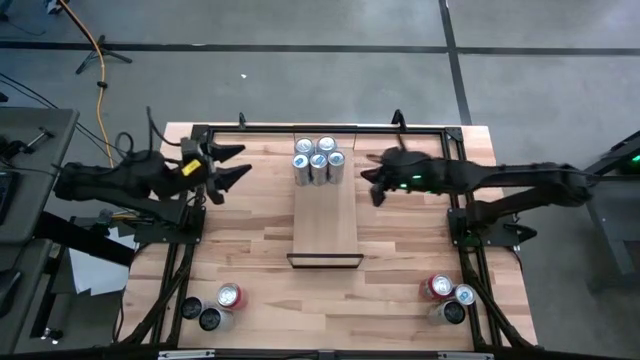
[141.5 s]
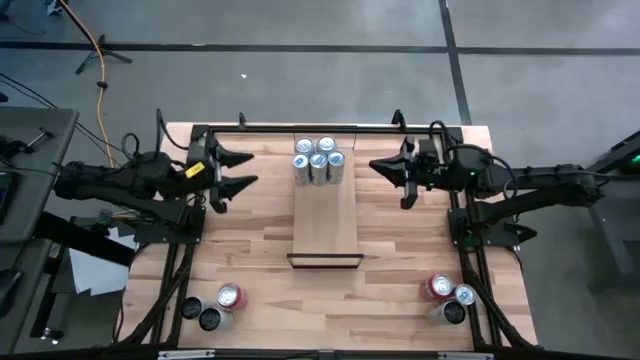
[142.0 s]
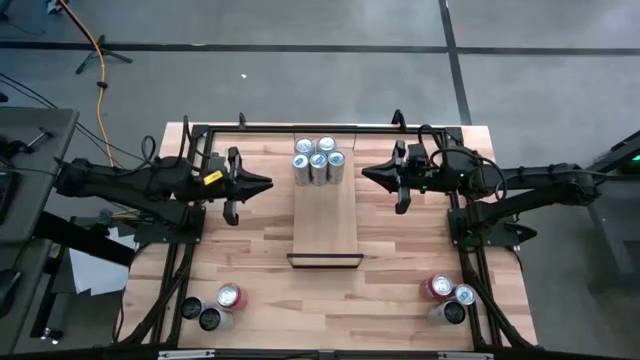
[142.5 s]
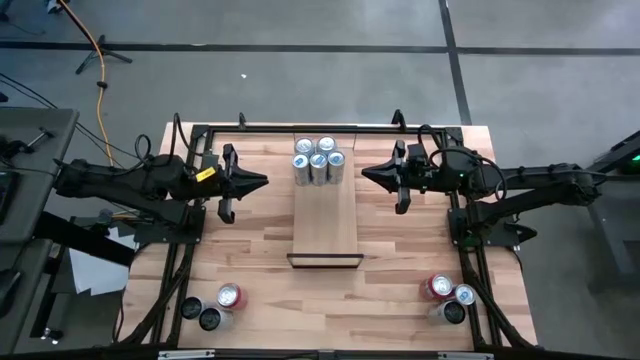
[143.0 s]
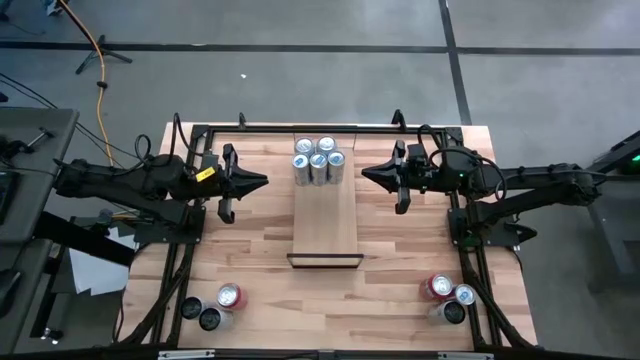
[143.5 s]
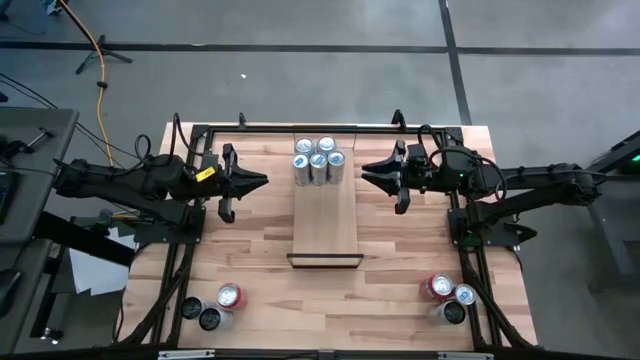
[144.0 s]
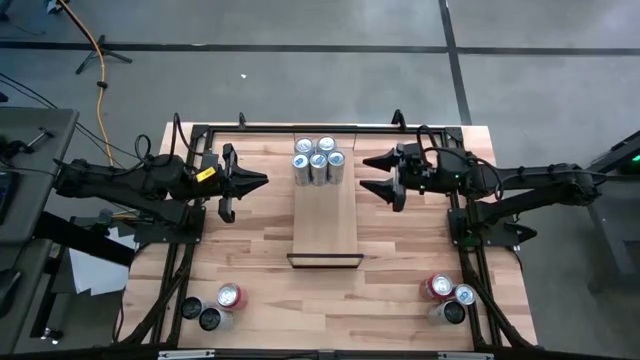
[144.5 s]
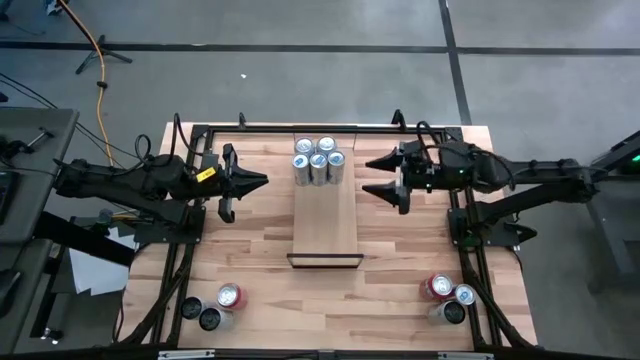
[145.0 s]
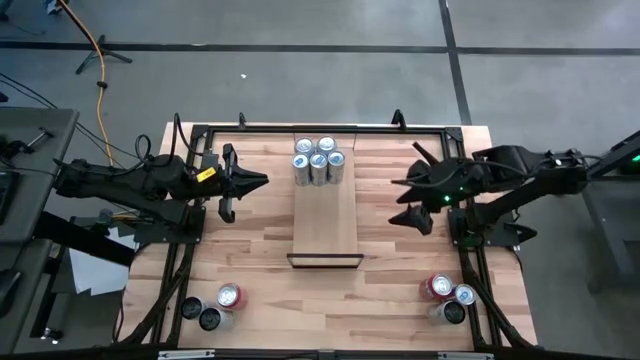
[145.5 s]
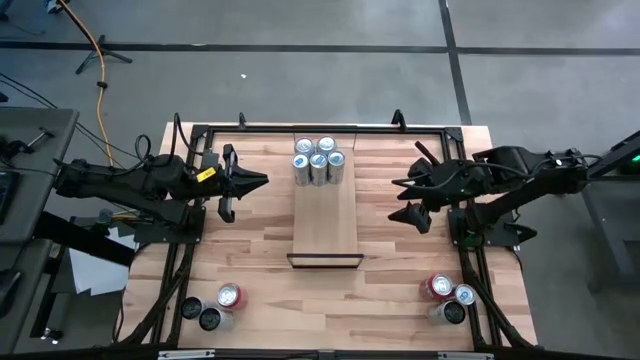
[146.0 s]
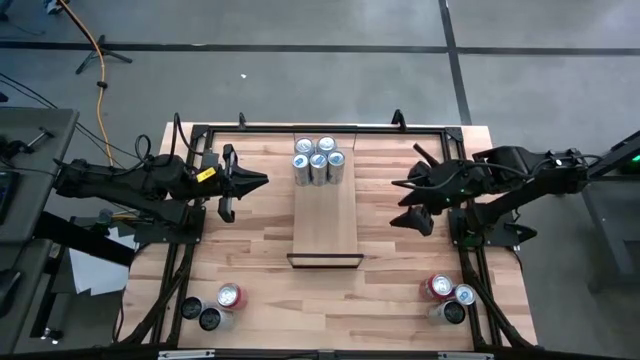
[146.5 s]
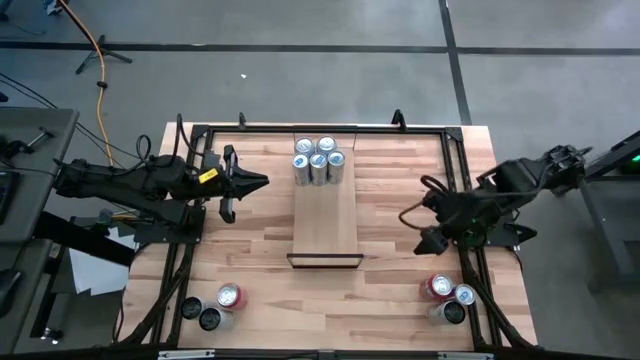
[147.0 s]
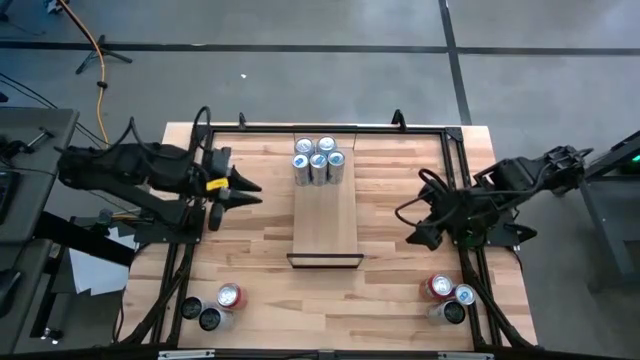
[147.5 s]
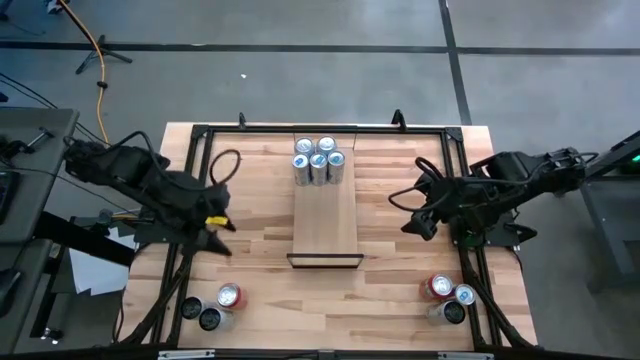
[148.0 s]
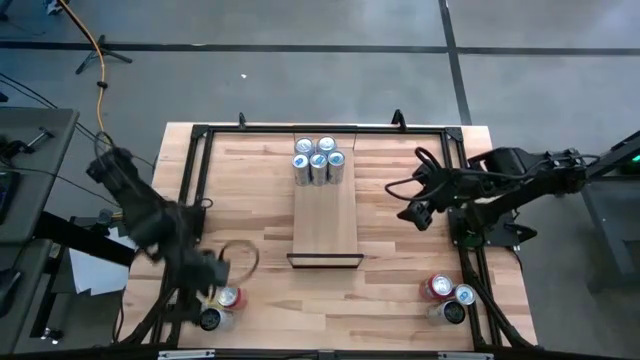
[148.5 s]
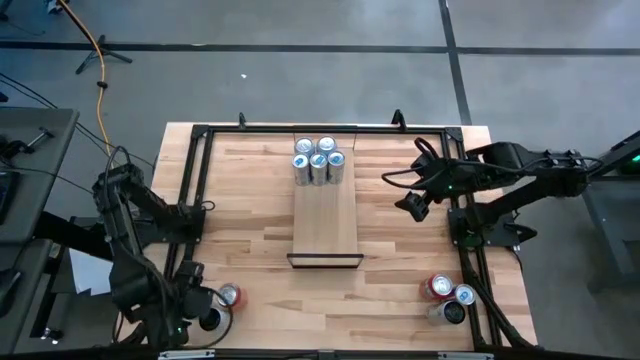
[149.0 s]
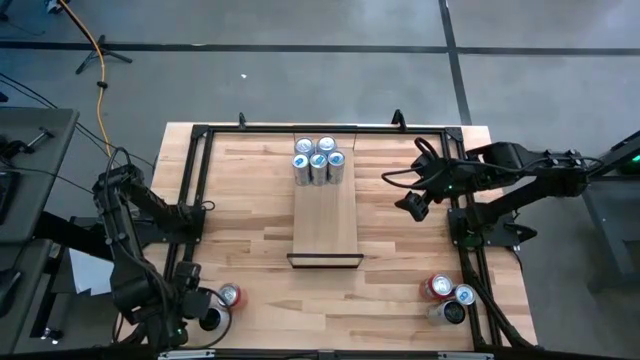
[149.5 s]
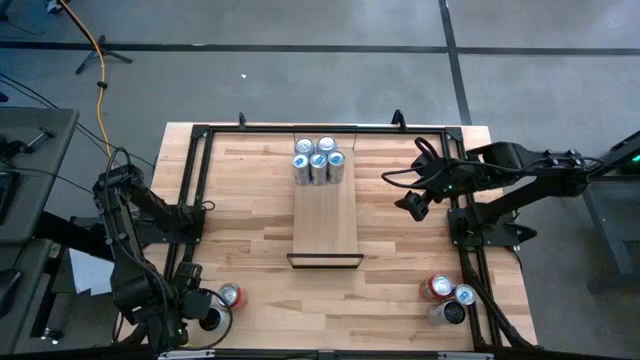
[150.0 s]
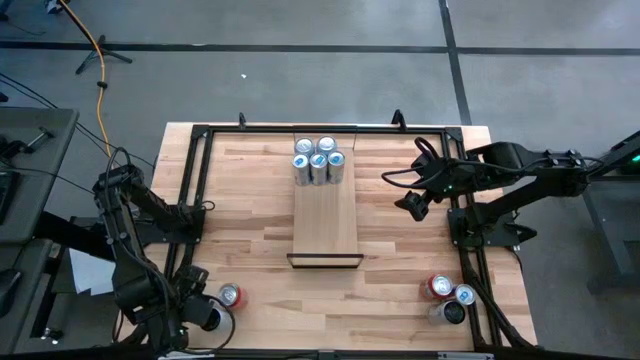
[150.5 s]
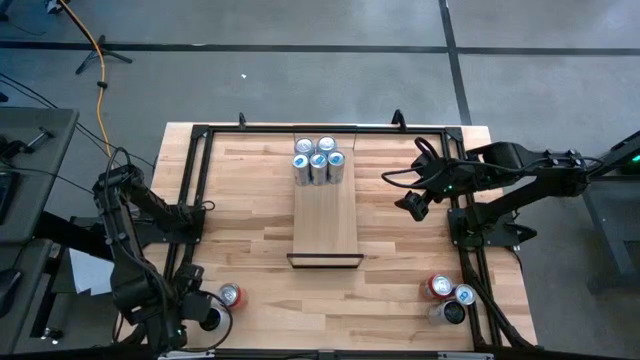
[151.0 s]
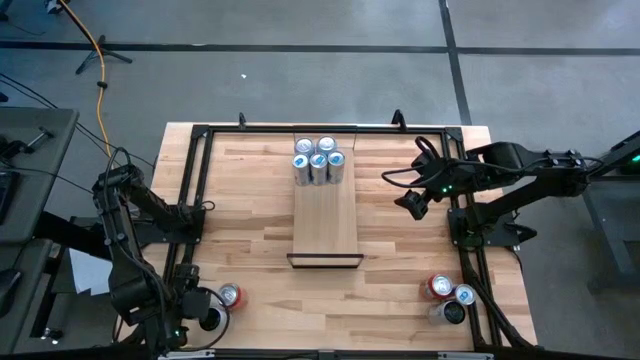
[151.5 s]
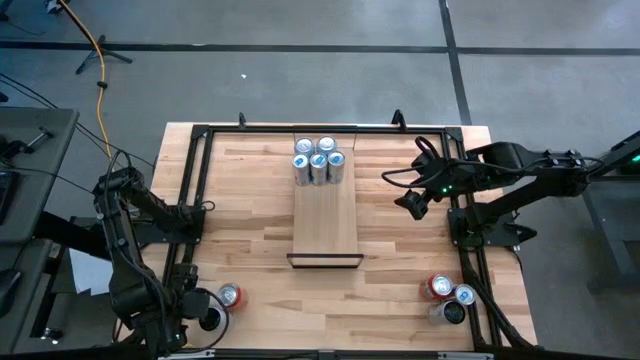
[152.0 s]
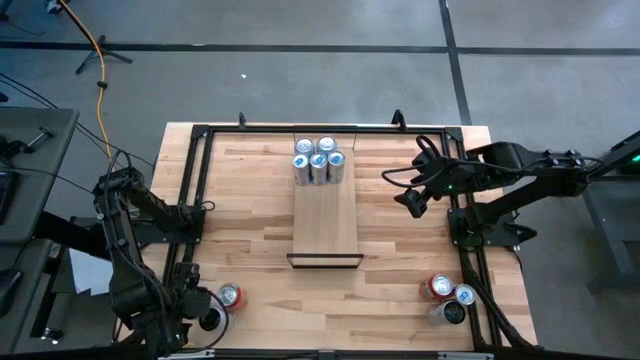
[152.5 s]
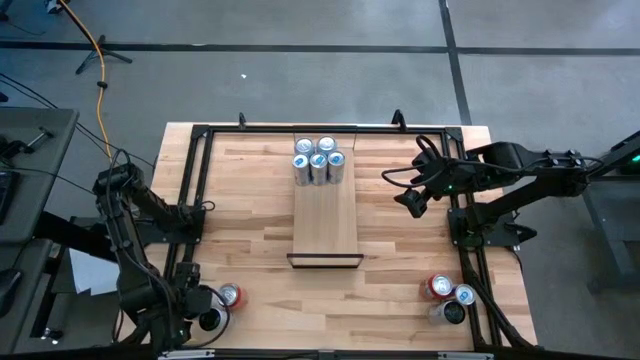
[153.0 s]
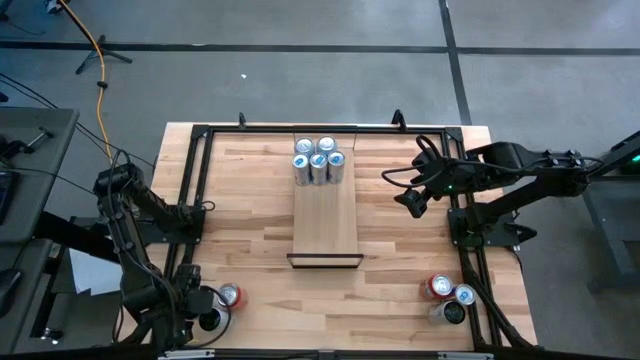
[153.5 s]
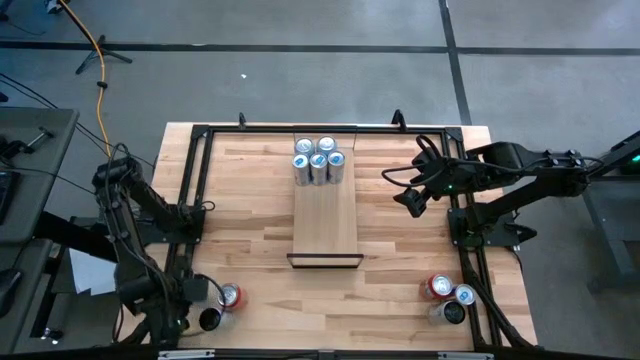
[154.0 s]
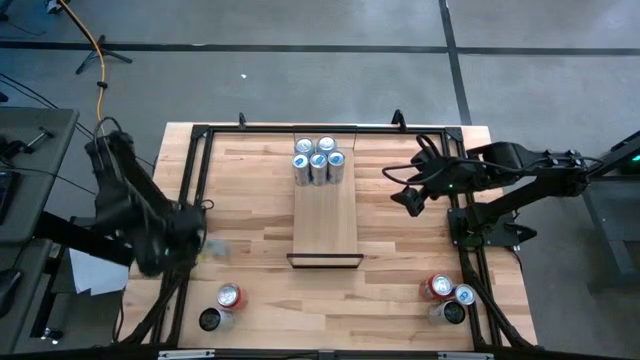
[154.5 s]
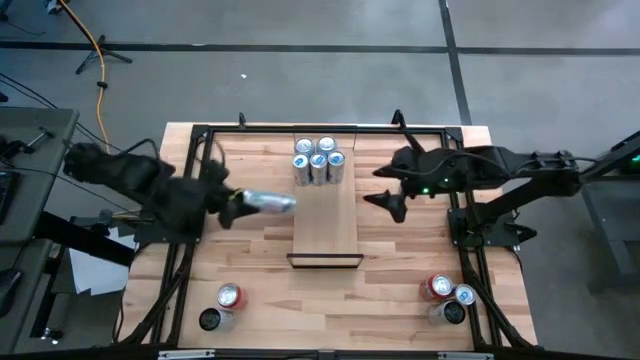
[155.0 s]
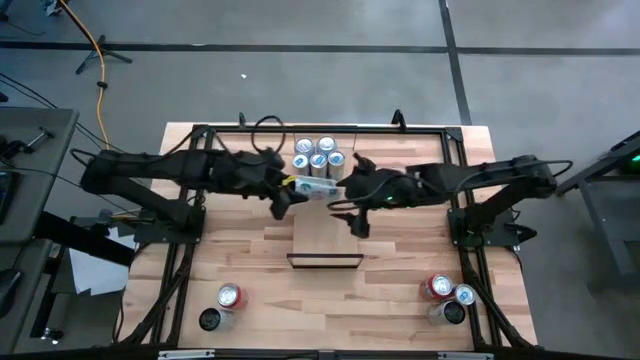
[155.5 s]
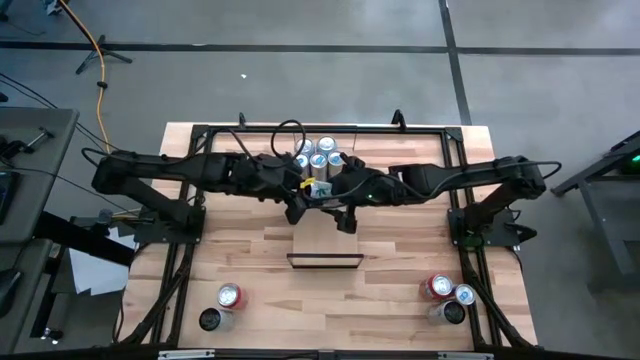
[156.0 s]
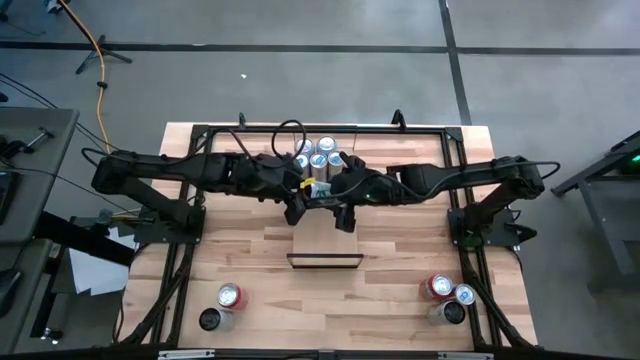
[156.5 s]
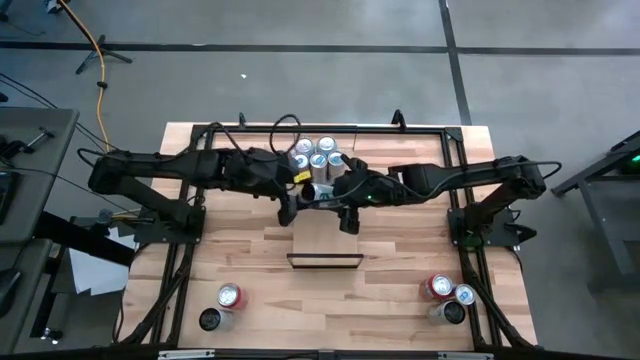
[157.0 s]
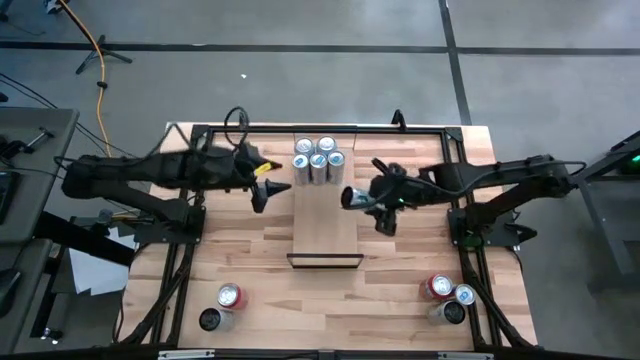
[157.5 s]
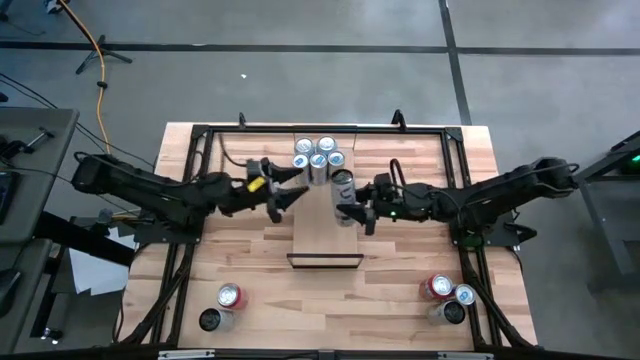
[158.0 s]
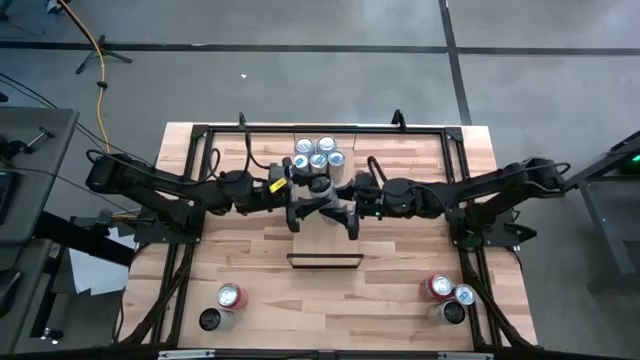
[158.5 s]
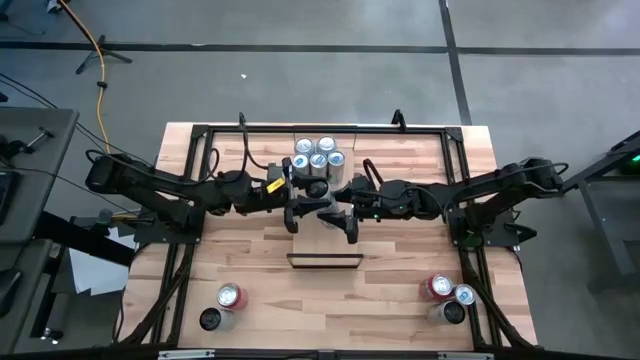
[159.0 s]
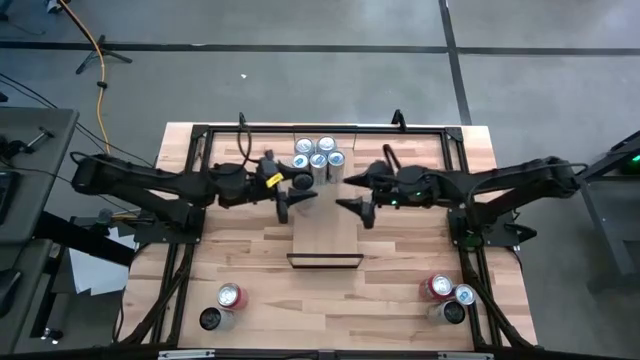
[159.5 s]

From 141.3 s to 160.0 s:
Task: Place canned beverage on shelf
Put the white pink soda can on the shelf

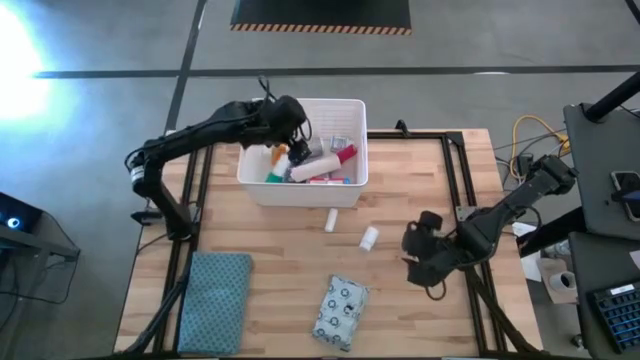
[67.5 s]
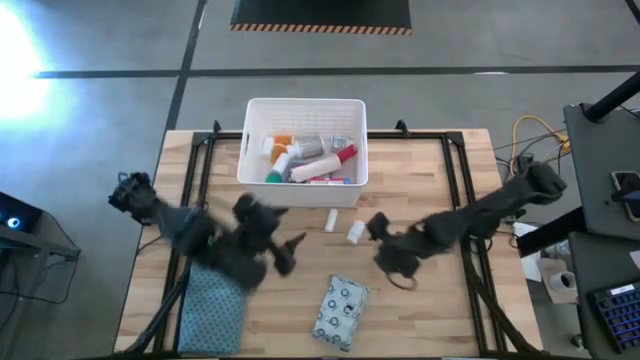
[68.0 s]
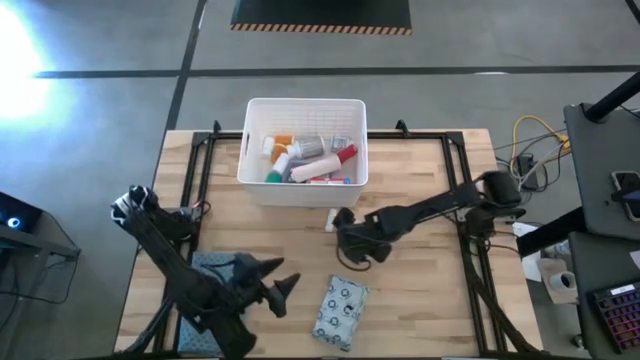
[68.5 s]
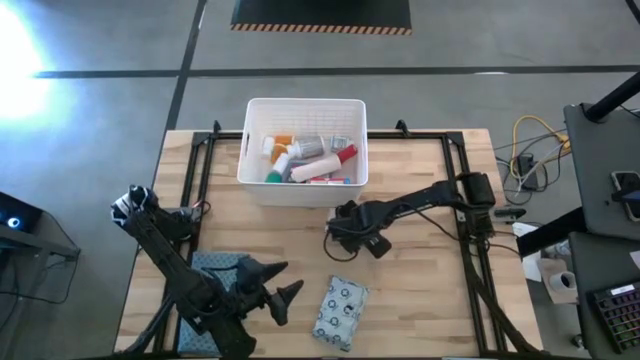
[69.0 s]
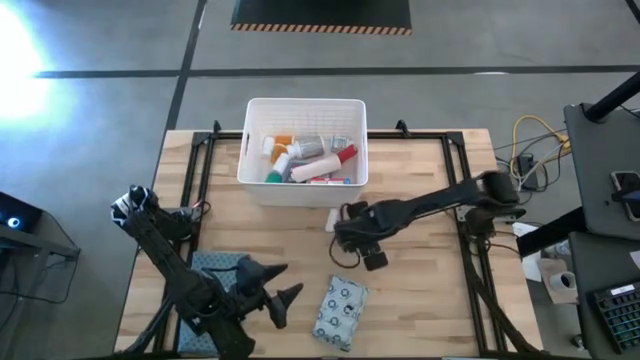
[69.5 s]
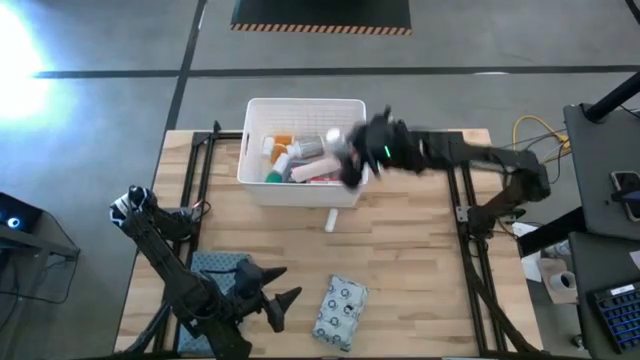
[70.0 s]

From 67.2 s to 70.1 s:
Task: Pick & place medical supplies in basket/bin
Put the white pill bottle into the white bin
